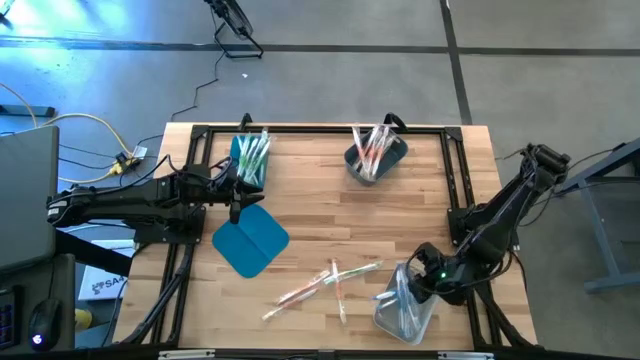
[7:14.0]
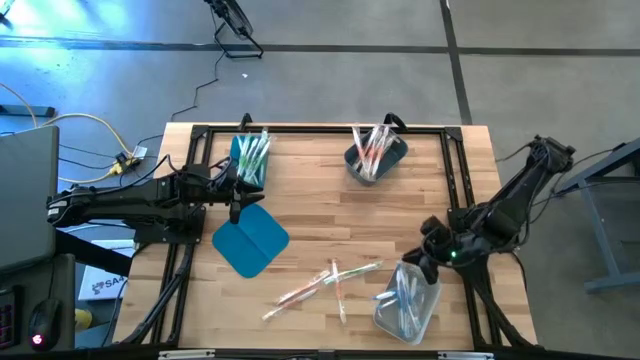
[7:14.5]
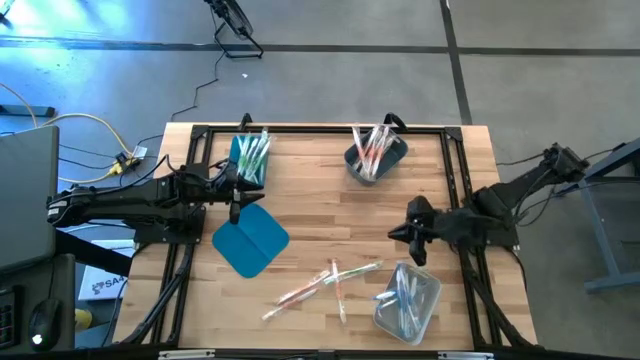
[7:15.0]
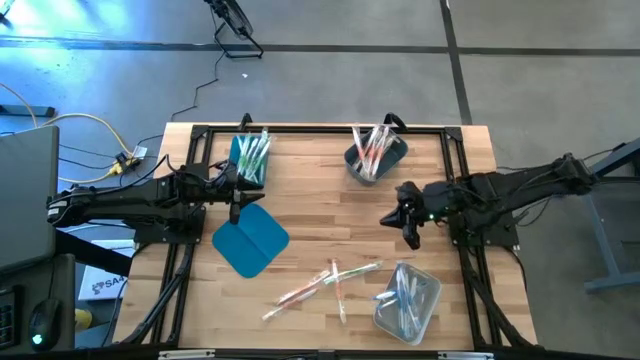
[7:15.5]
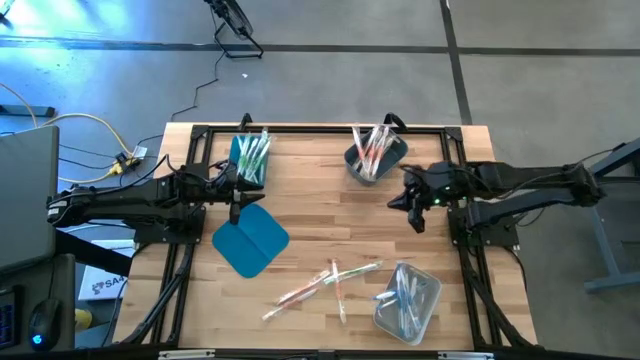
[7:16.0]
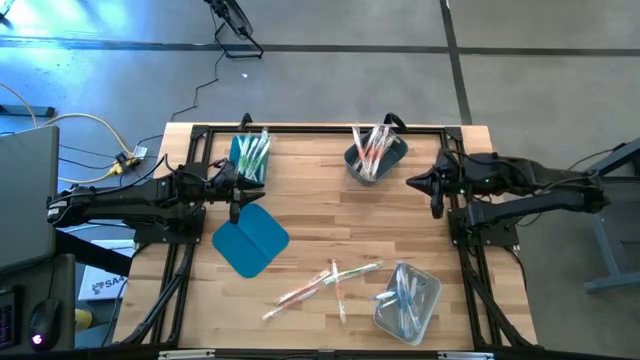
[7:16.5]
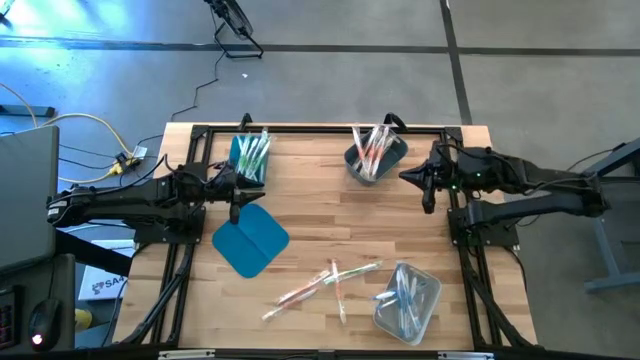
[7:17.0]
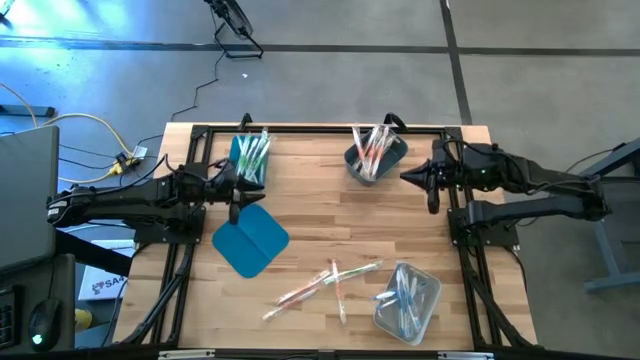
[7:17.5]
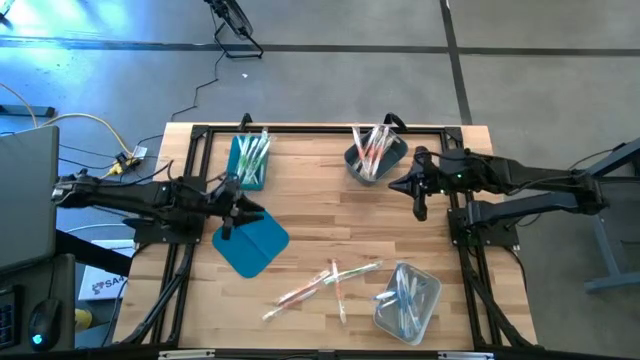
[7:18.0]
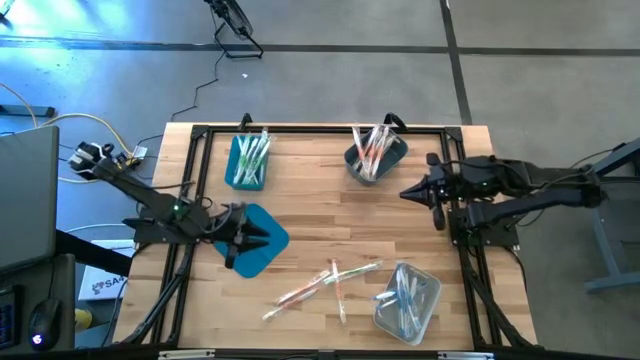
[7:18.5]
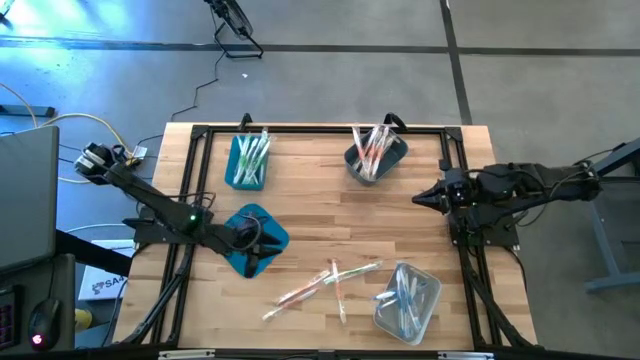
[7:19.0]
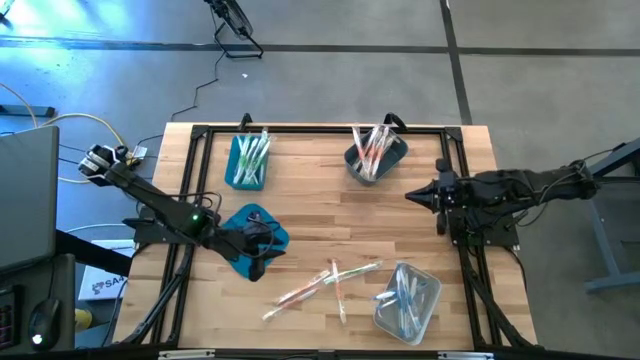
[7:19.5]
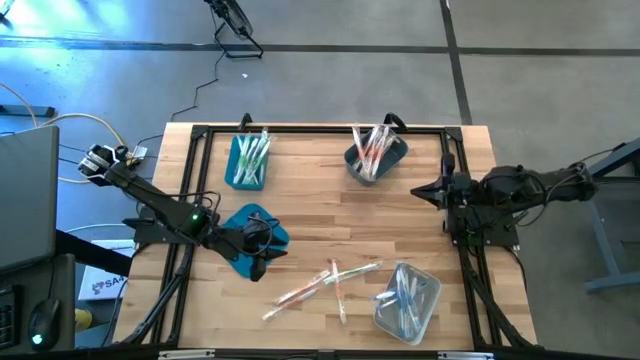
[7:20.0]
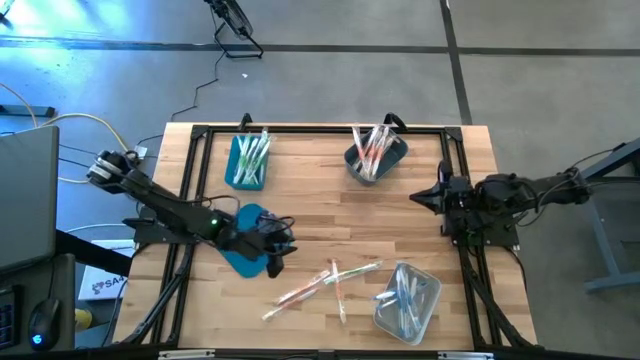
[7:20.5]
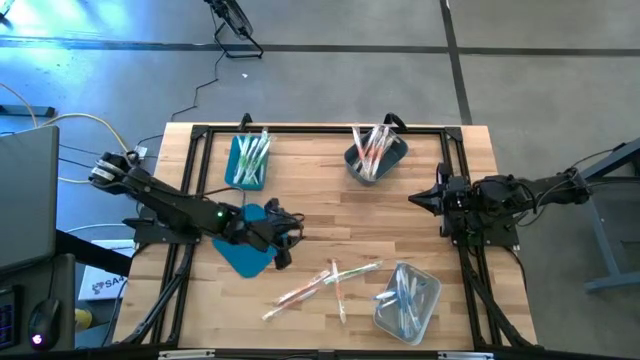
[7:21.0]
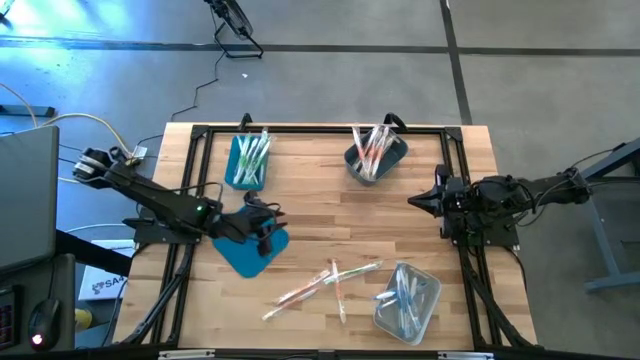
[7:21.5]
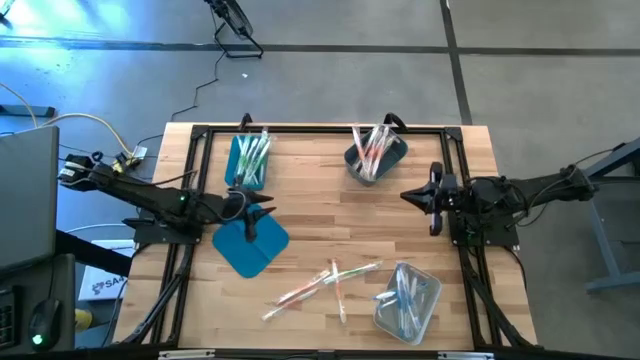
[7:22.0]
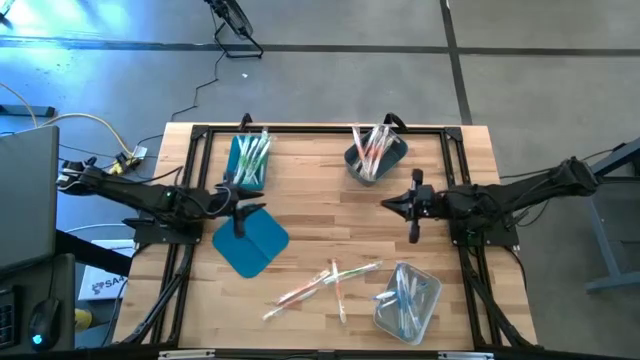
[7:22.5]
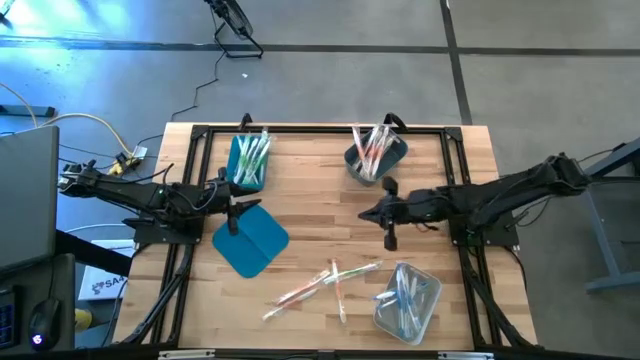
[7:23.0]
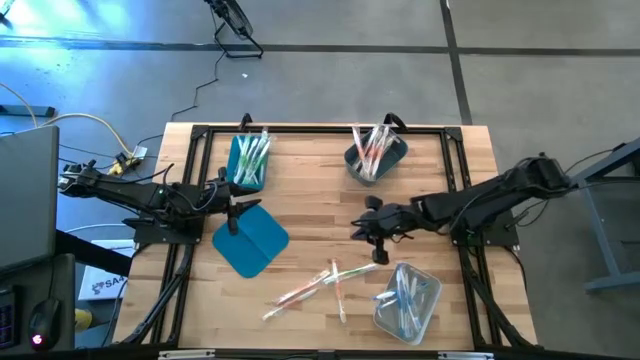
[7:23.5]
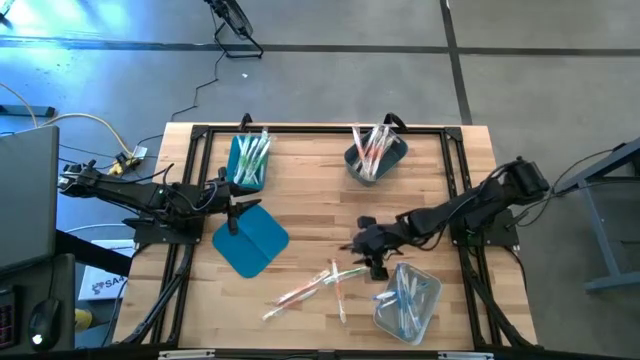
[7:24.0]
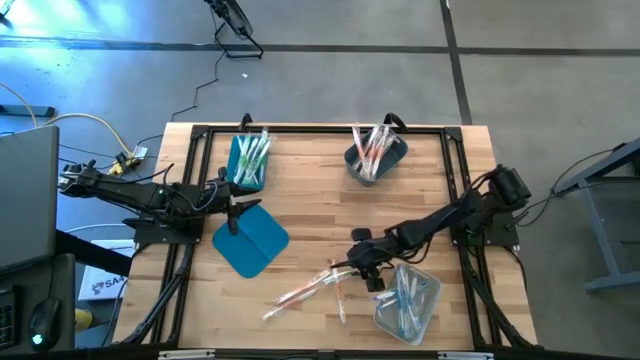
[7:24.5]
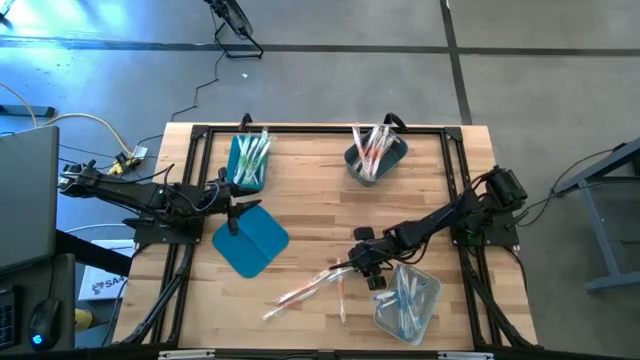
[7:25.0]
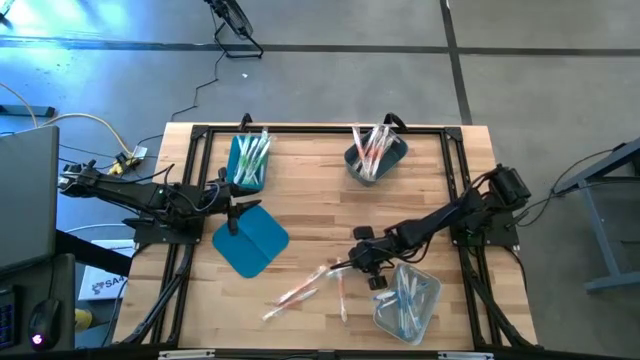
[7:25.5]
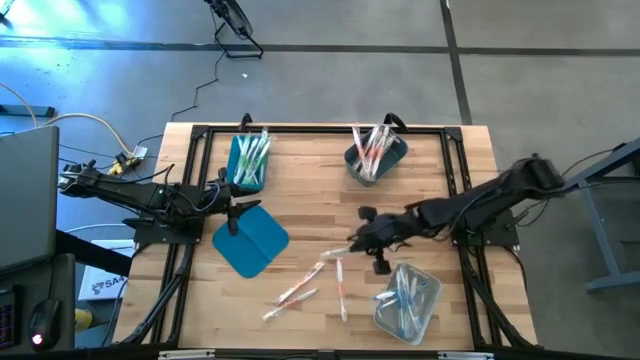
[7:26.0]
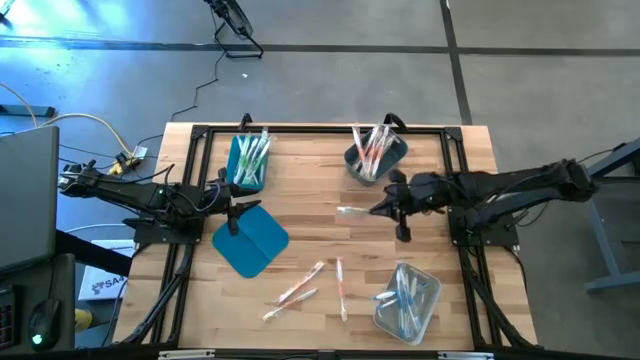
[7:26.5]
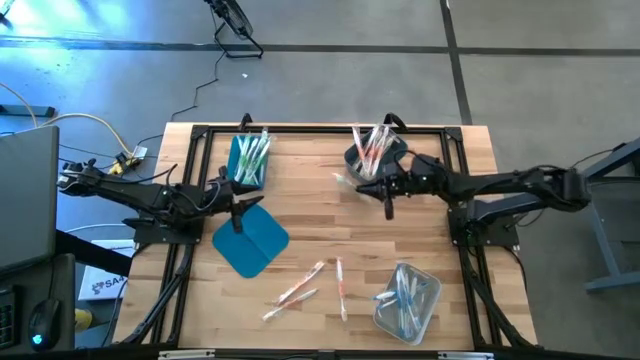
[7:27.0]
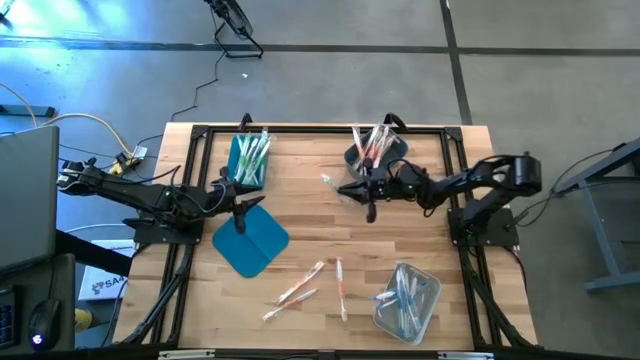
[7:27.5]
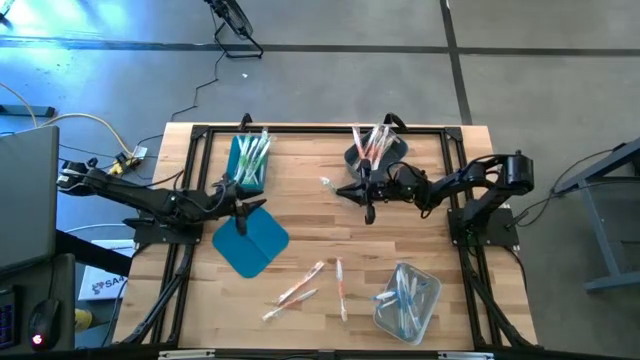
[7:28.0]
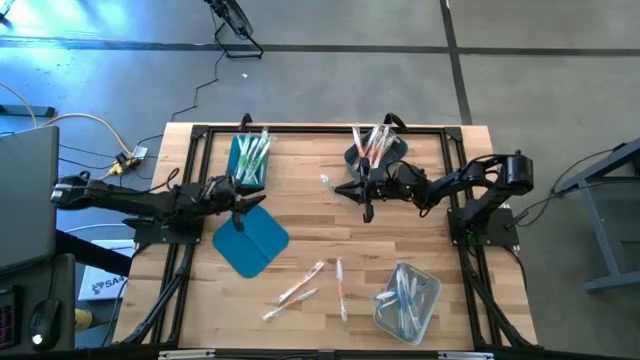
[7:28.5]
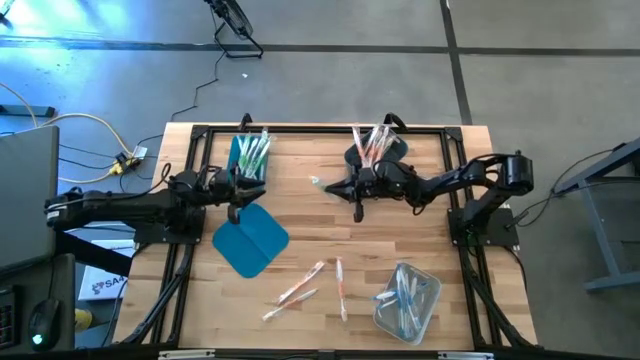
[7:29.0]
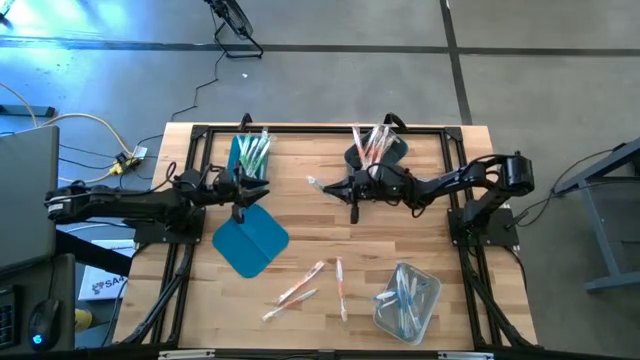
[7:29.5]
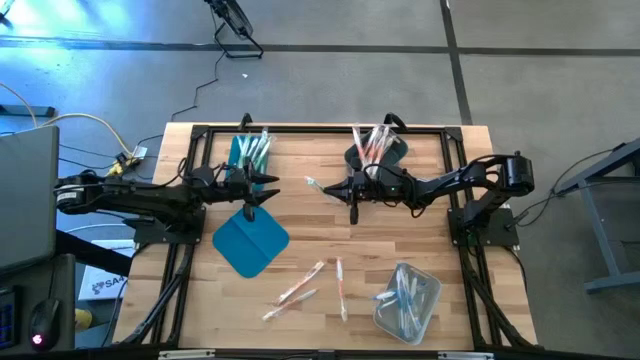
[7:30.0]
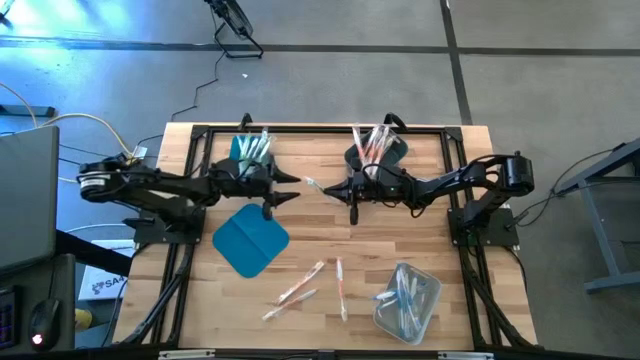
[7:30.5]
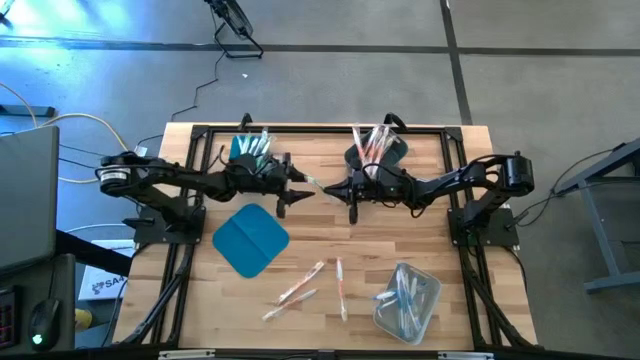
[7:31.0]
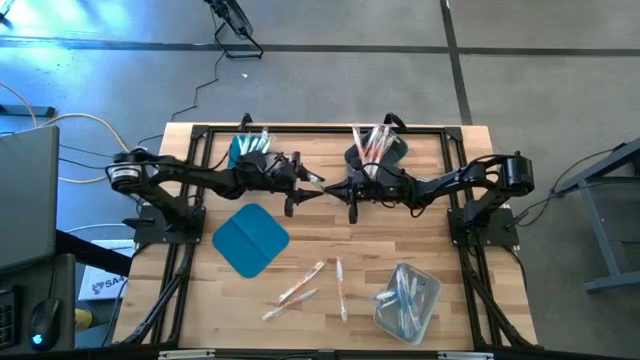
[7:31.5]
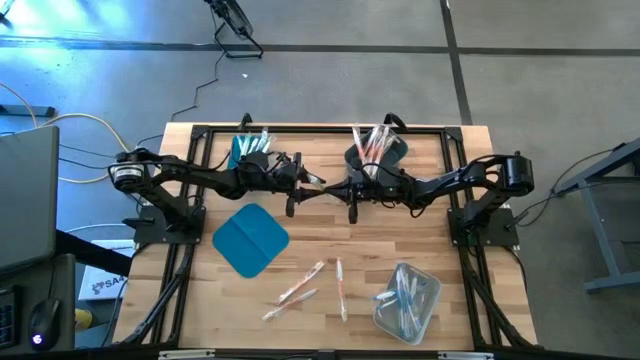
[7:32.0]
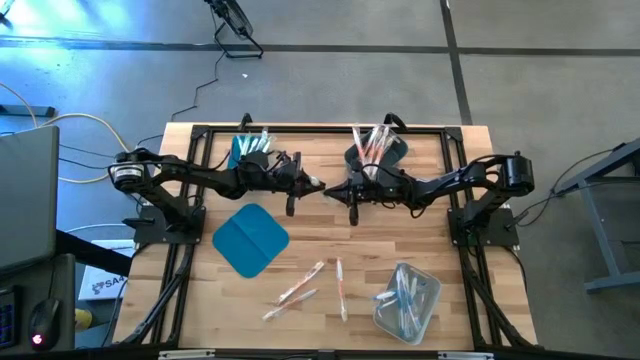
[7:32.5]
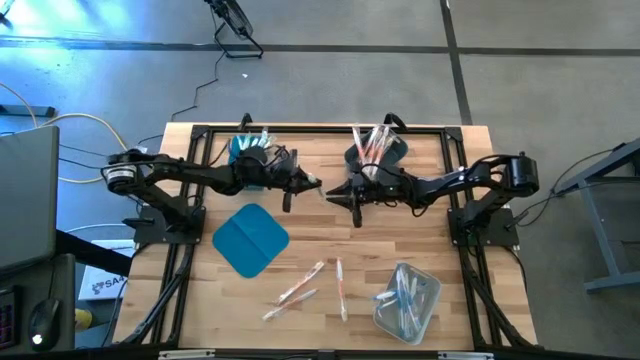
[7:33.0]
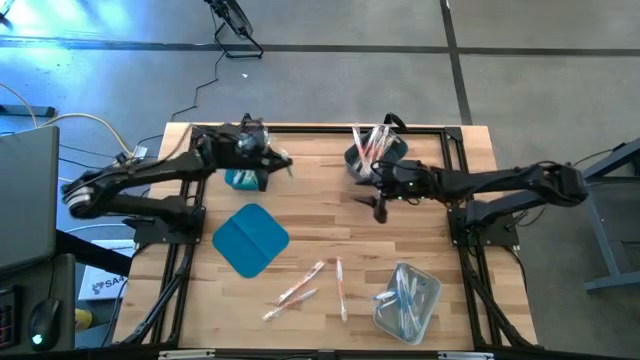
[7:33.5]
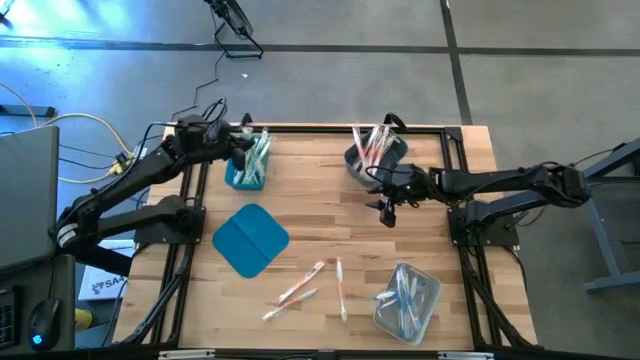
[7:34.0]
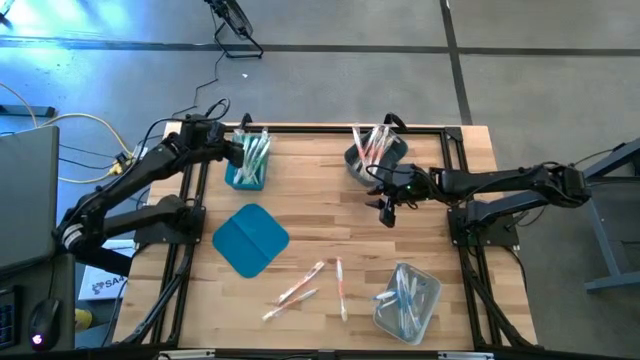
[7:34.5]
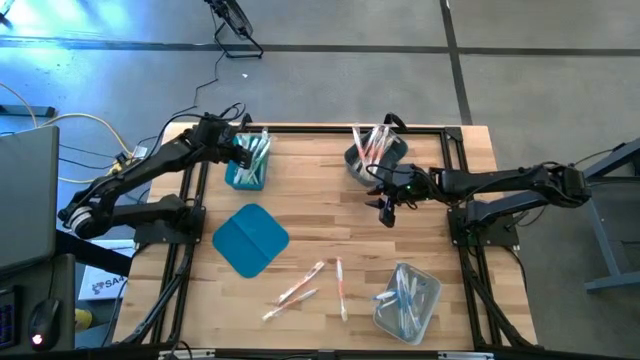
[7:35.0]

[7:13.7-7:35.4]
Task: Pick & Place Toothbrushes
Put the green toothbrush into the blue bin
